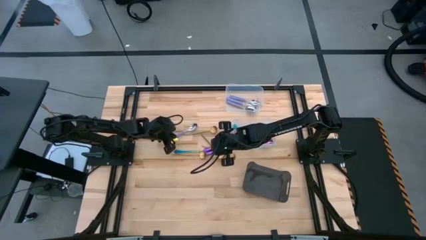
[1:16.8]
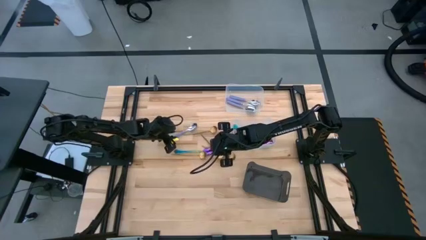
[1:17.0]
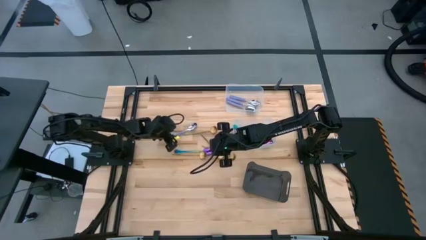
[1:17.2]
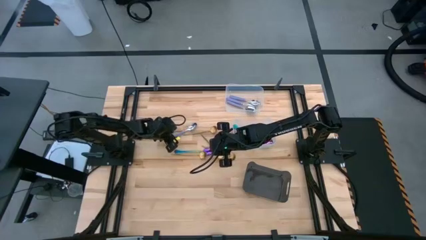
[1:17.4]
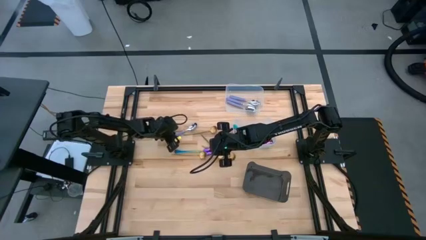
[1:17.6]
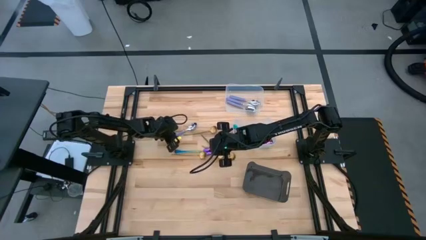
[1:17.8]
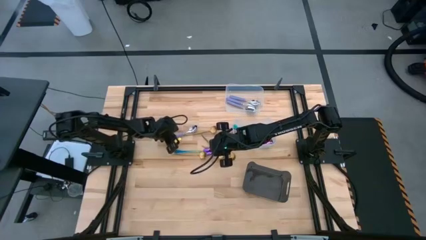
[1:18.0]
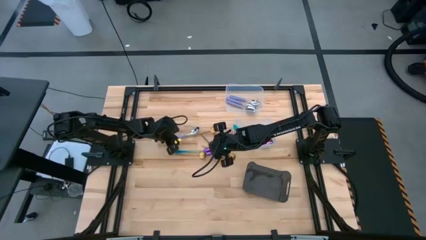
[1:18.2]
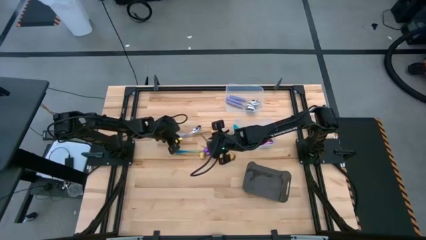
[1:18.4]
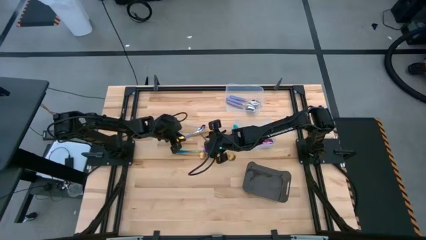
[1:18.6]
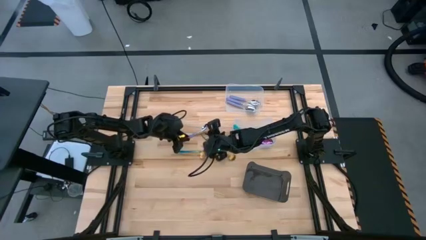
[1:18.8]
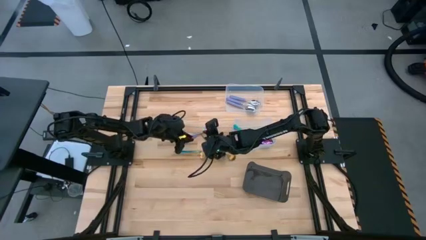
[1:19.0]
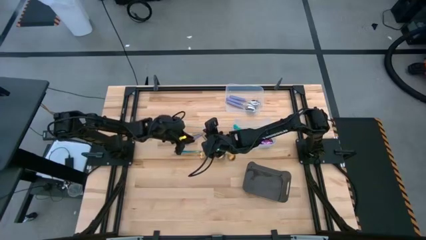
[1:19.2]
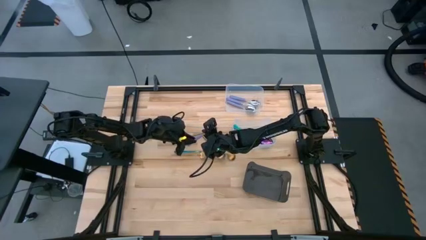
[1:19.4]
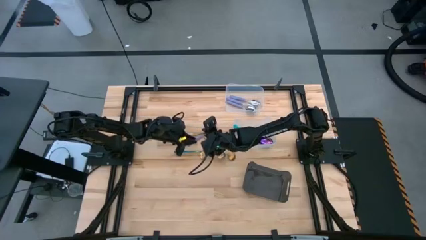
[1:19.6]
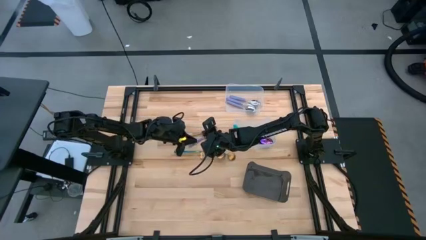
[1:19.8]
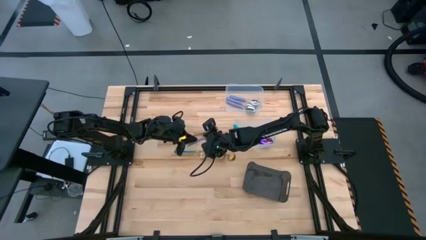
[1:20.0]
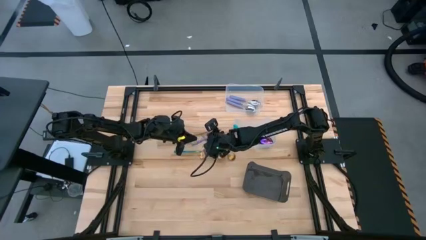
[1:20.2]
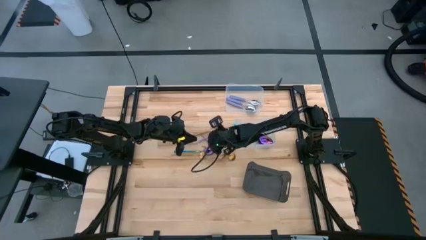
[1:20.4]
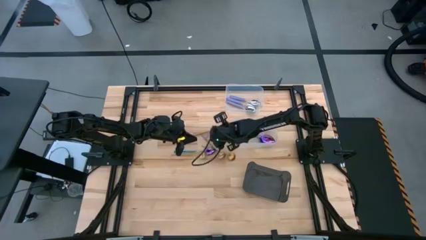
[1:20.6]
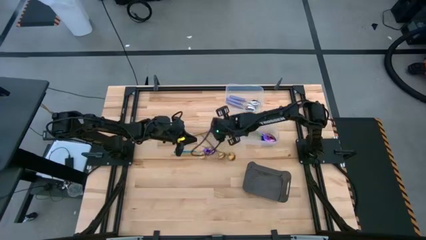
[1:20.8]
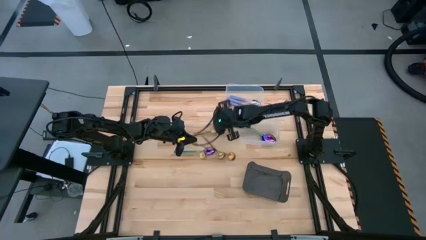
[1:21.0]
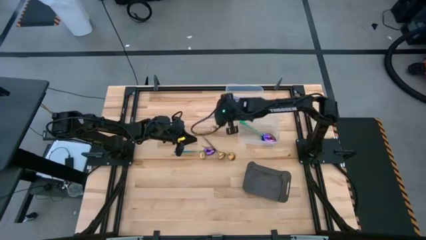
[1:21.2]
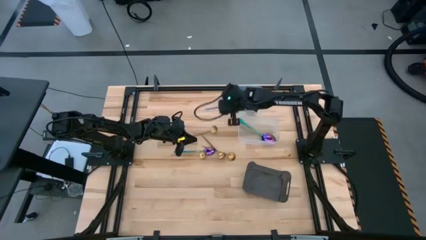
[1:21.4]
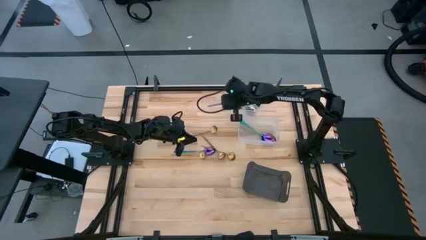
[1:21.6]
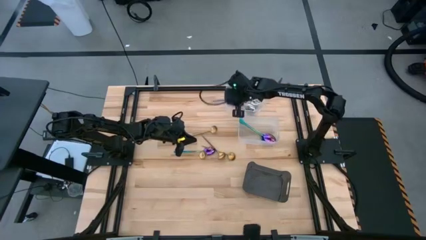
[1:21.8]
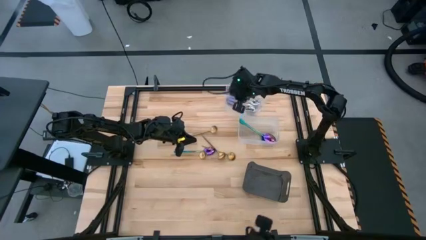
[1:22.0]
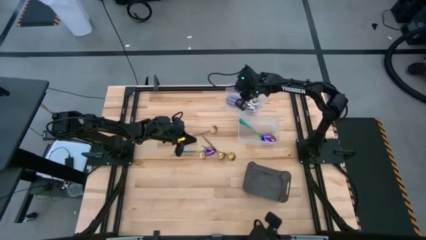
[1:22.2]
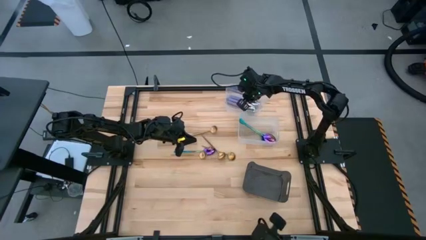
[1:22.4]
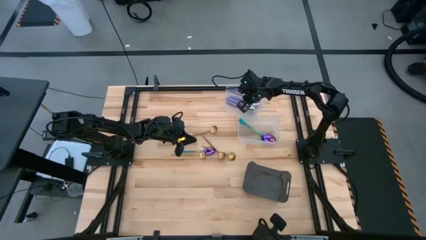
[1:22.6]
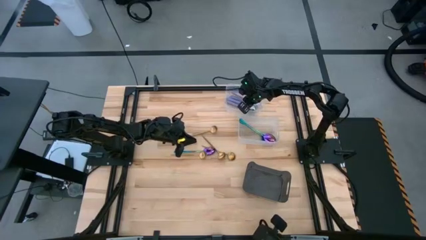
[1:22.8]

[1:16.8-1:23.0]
Task: Sort silverware by color (type)
Put the violet spoon into the top transparent bin

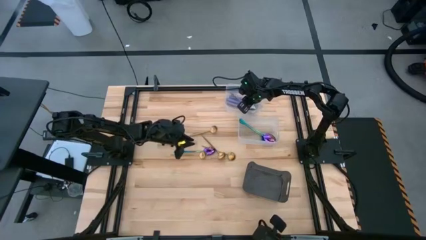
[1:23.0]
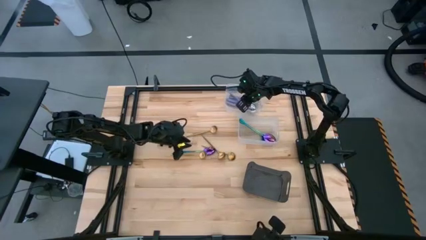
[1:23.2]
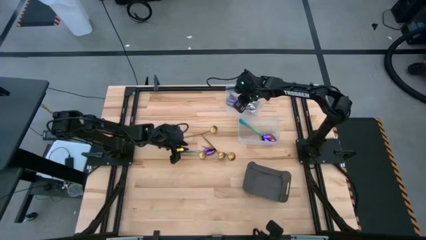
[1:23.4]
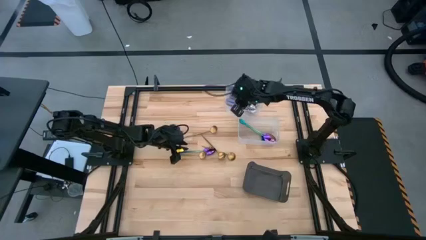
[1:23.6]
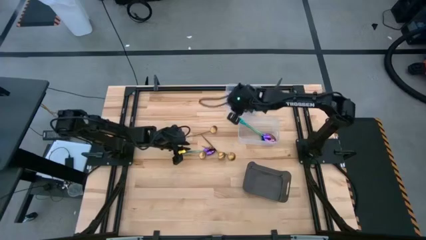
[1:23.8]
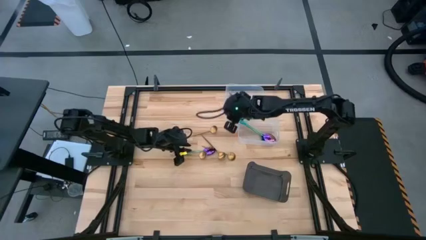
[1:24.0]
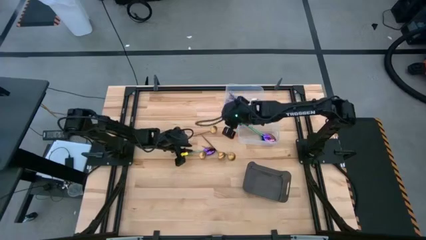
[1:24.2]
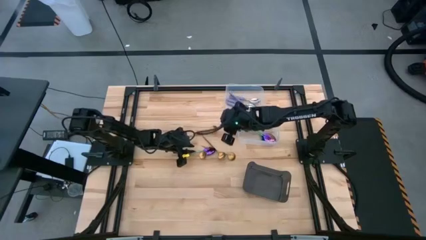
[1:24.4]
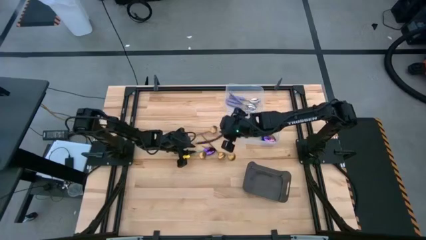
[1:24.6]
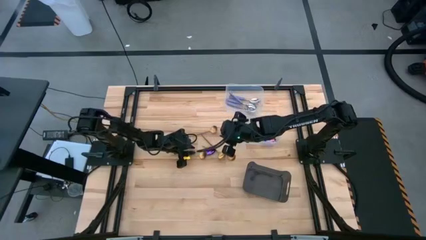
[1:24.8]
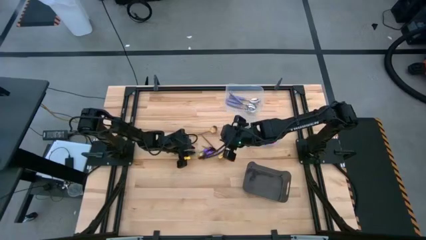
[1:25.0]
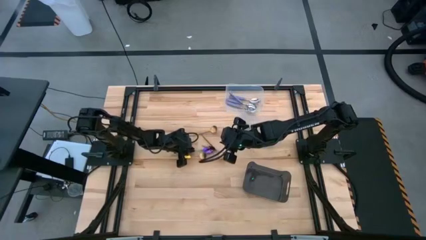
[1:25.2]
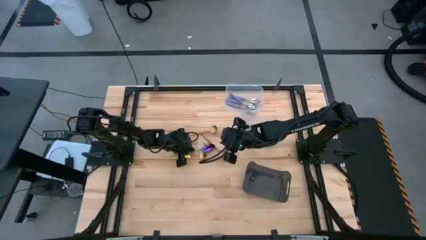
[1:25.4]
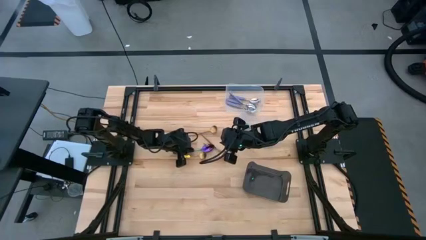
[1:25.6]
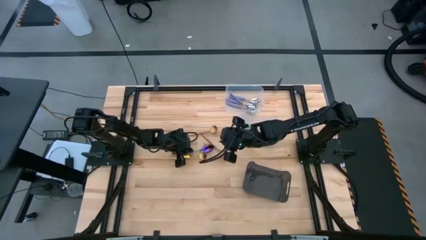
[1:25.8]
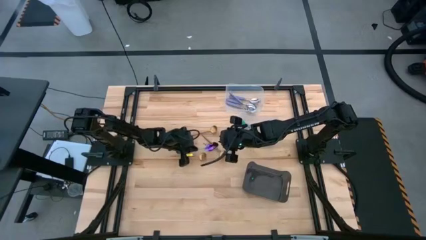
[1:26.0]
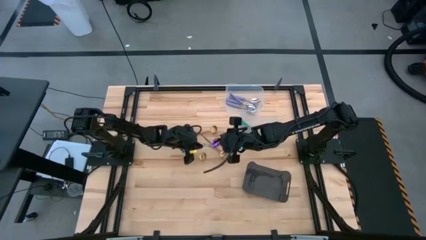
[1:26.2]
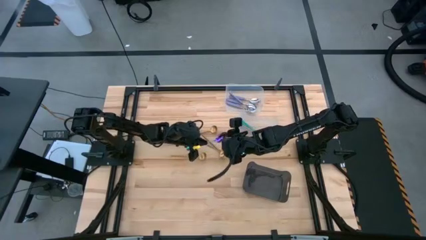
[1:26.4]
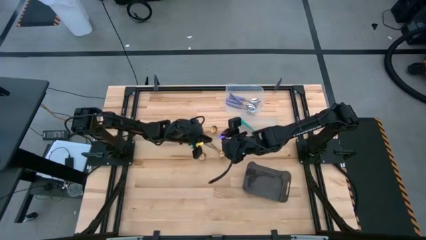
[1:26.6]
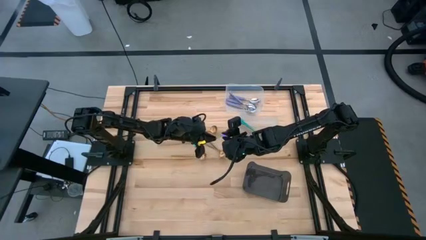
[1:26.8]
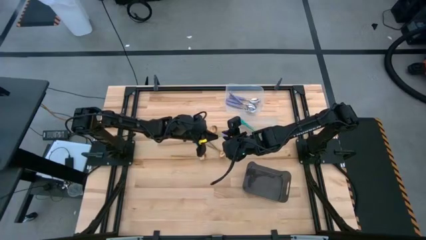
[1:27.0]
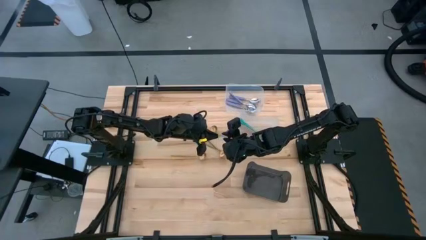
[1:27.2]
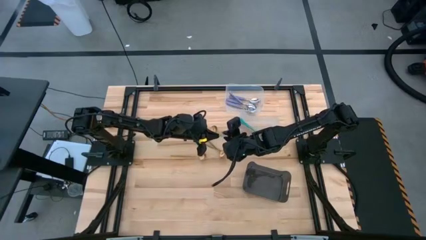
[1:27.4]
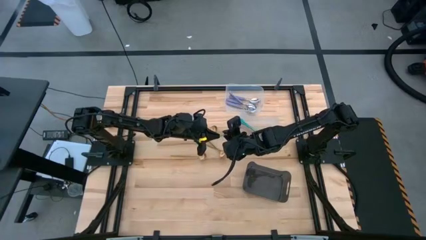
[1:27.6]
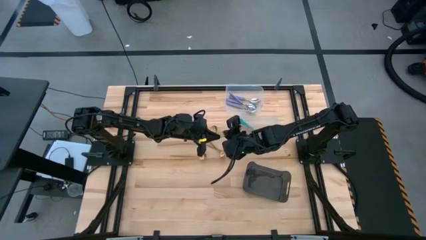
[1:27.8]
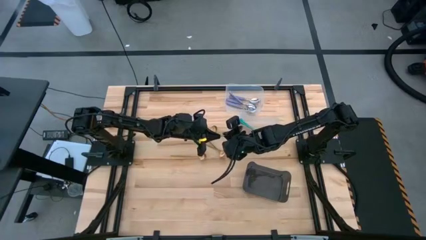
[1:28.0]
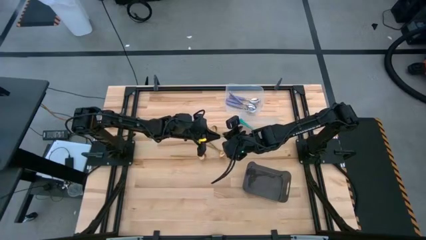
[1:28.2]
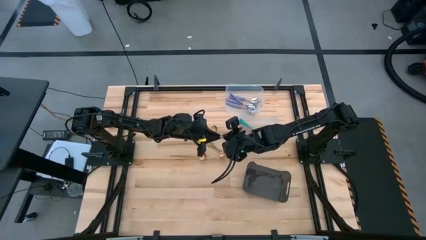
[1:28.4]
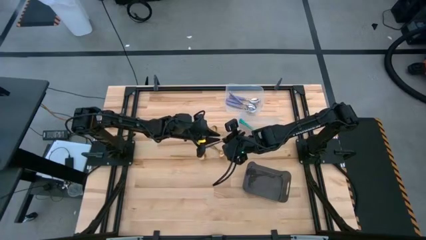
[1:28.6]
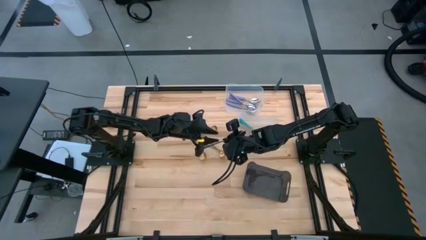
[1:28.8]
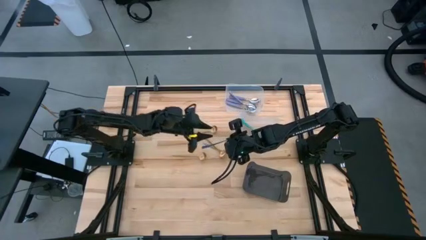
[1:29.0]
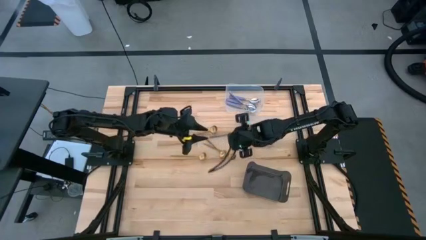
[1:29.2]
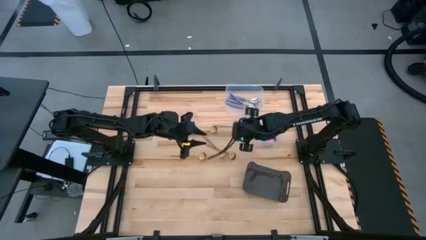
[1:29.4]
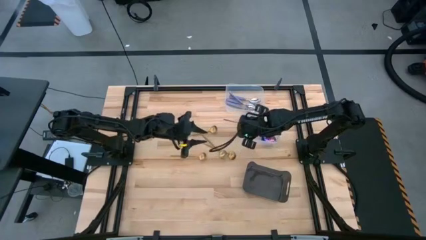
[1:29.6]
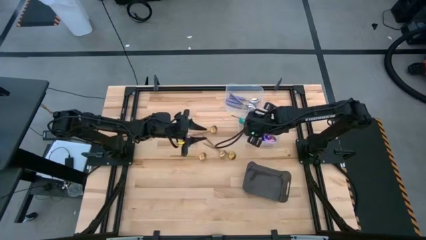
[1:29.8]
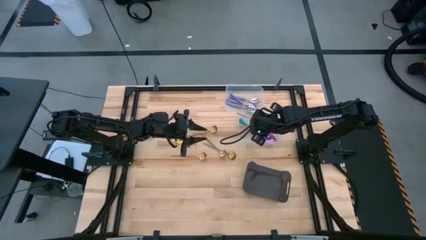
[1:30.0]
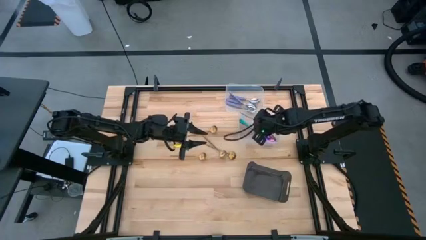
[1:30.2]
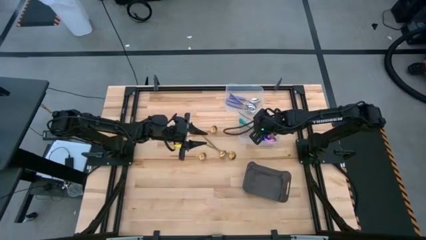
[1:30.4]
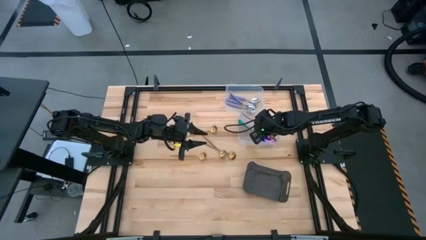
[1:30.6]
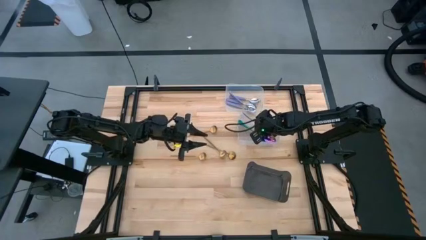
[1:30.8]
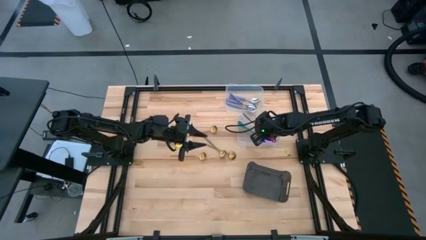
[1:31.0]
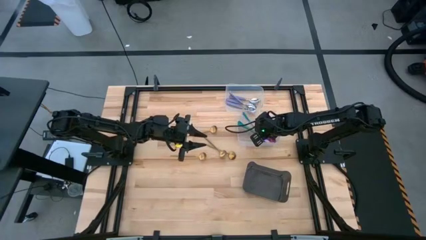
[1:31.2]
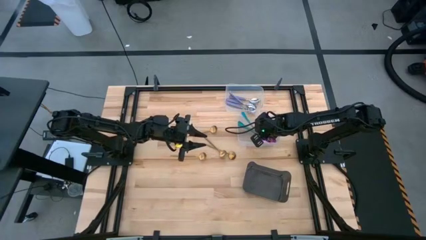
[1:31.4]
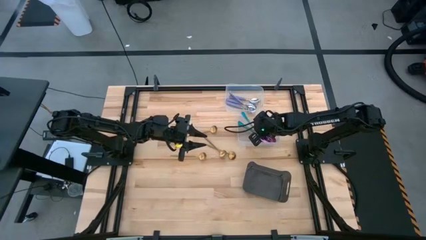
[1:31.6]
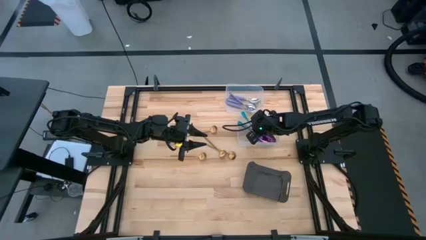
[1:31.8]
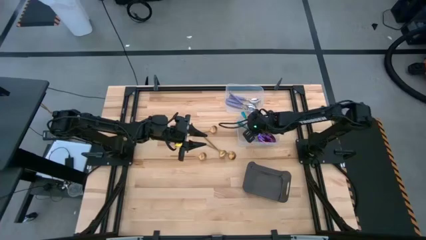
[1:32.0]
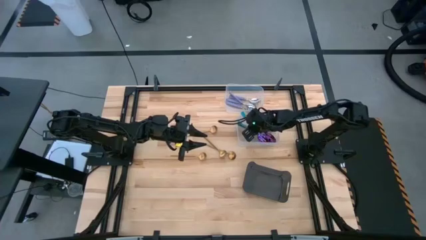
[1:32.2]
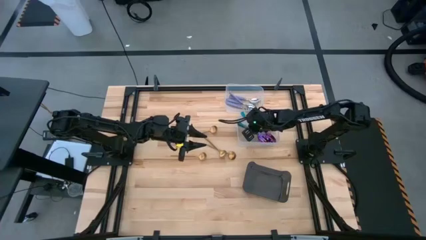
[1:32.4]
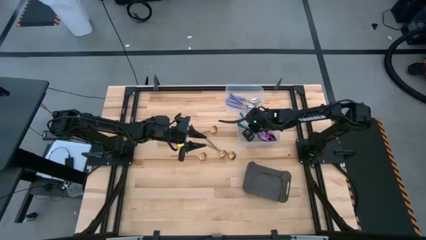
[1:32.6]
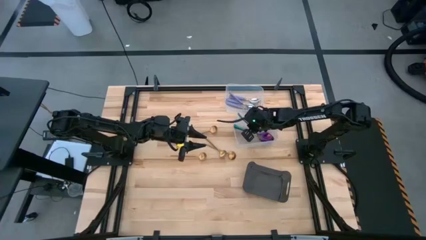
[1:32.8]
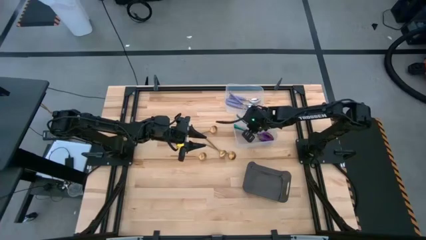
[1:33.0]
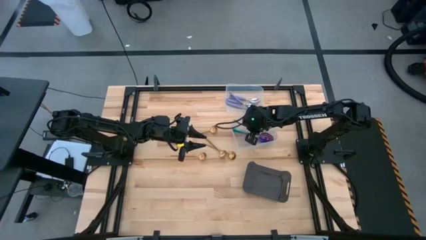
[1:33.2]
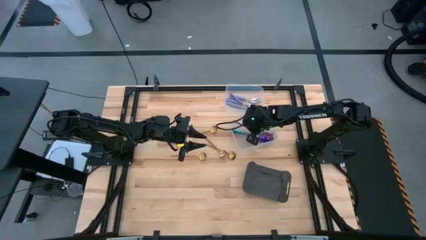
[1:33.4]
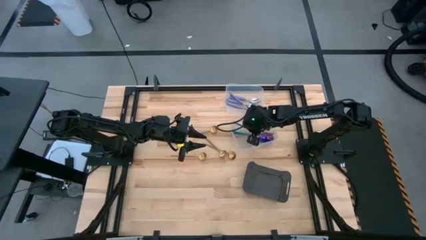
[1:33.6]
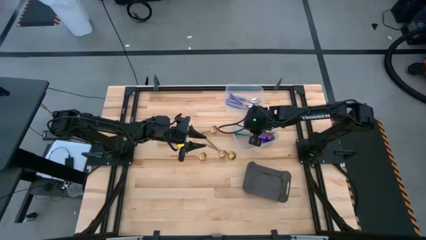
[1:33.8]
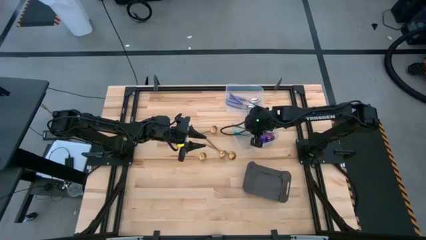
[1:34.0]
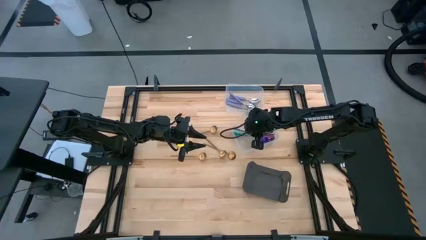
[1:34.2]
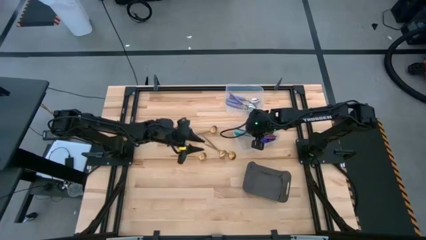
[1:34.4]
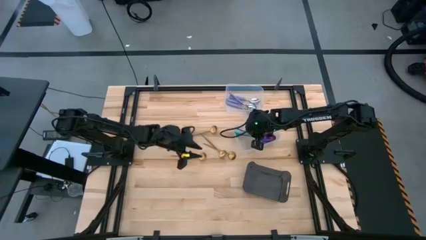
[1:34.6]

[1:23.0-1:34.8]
Put the blue spoon into the bottom transparent bin
